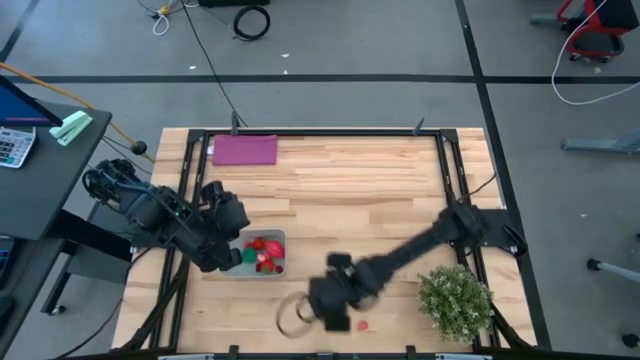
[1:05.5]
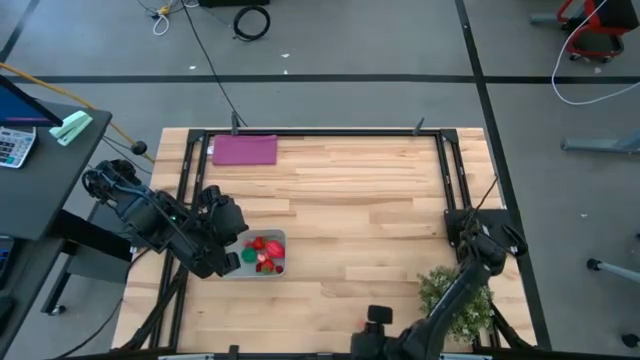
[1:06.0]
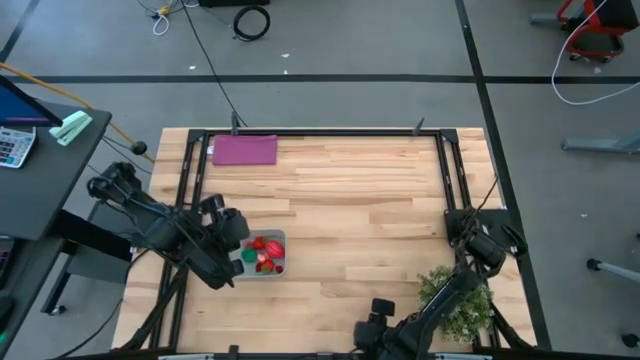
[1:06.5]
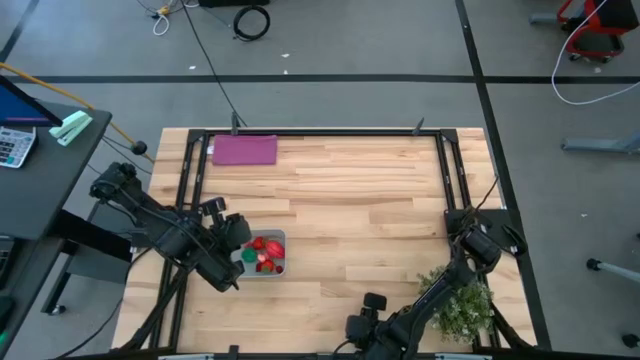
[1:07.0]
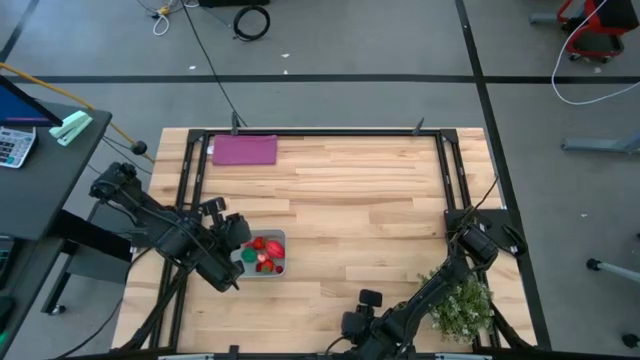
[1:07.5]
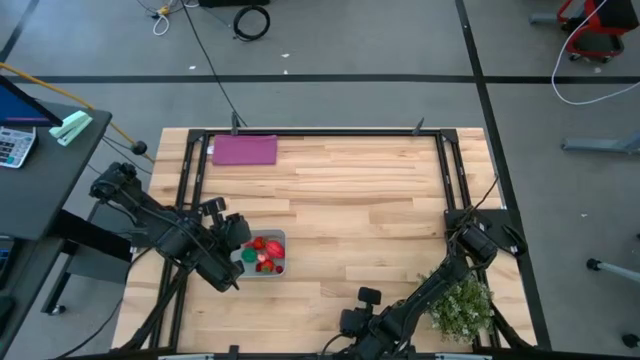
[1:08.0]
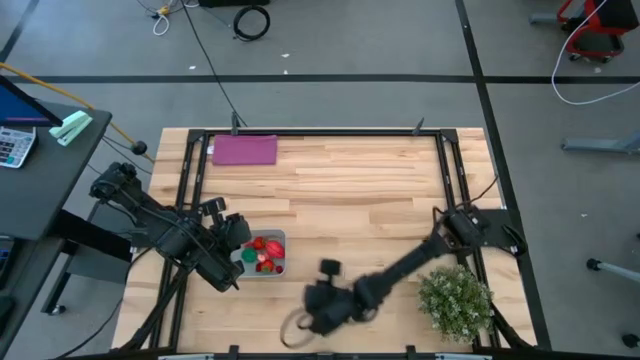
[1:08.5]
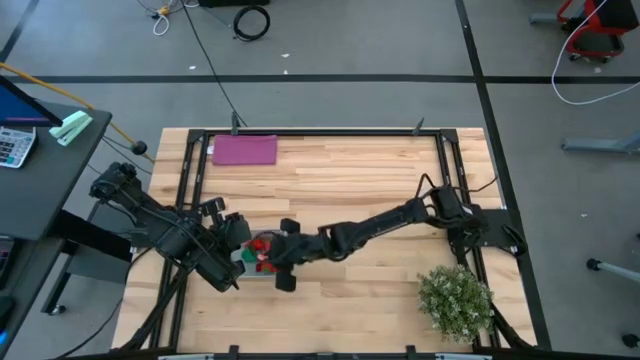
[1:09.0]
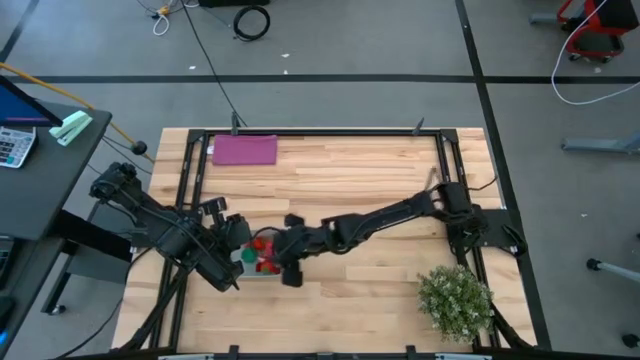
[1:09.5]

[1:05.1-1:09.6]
Task: Pick and placing Produce into tupperware
Put the lychee into the gray container

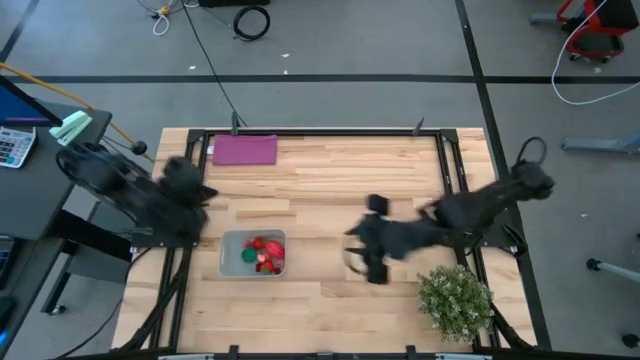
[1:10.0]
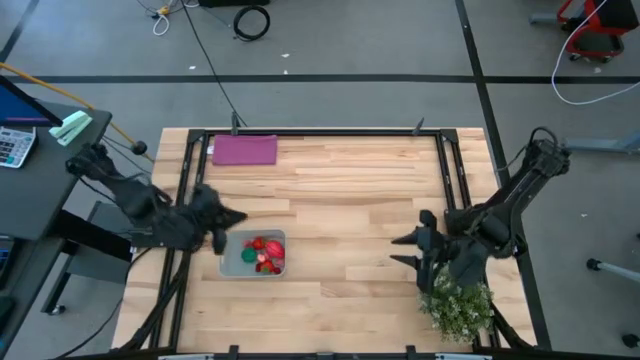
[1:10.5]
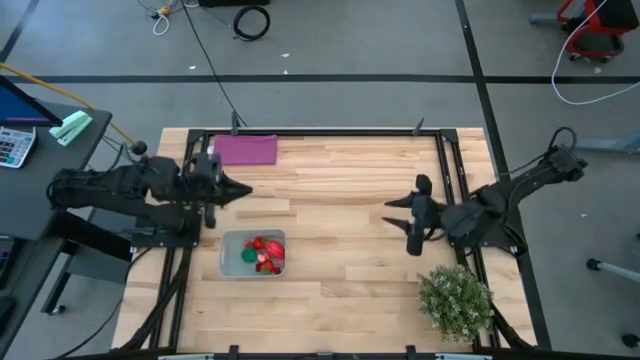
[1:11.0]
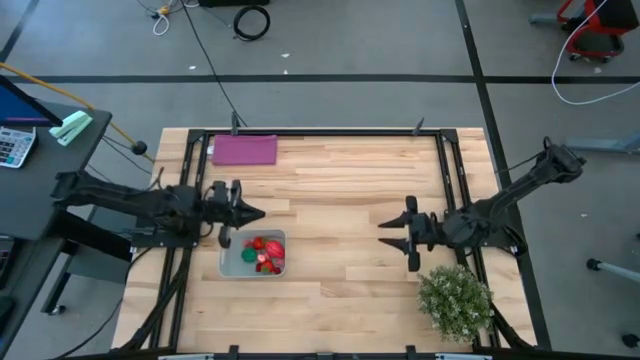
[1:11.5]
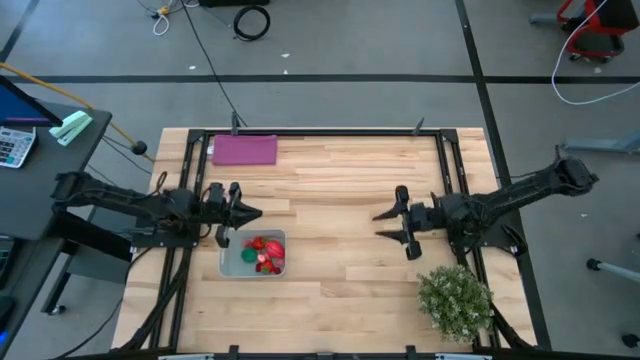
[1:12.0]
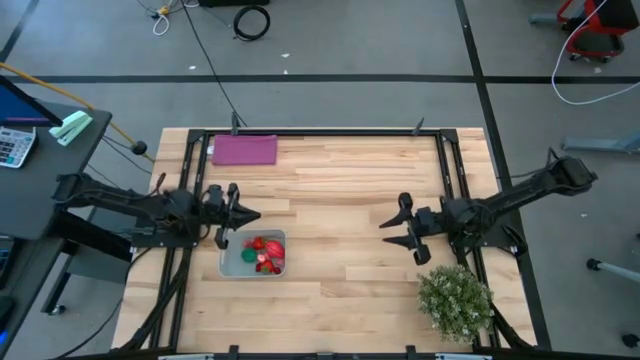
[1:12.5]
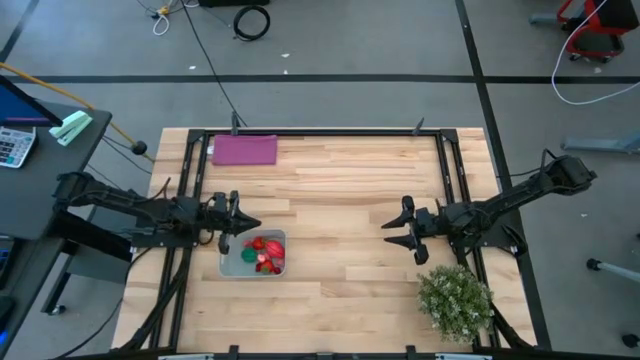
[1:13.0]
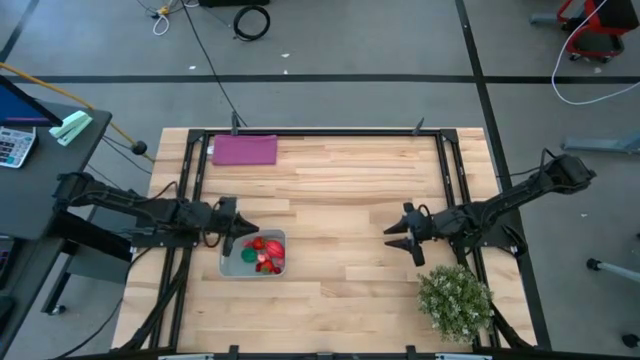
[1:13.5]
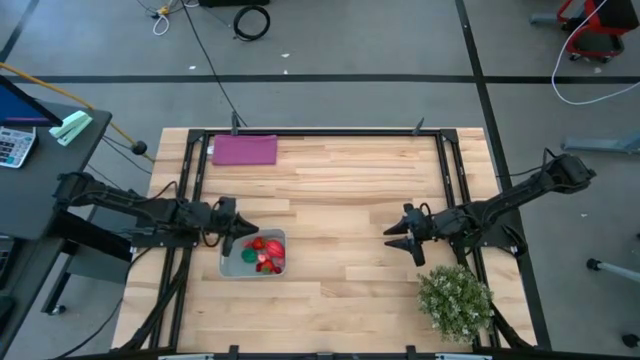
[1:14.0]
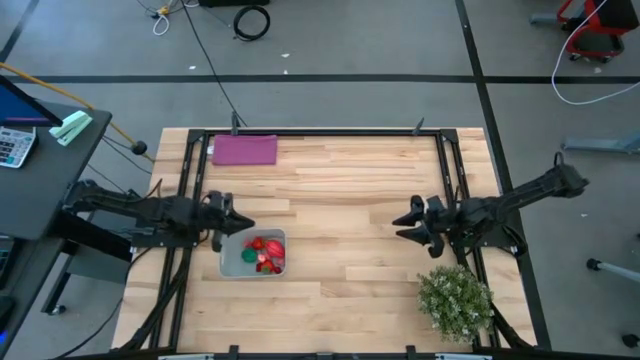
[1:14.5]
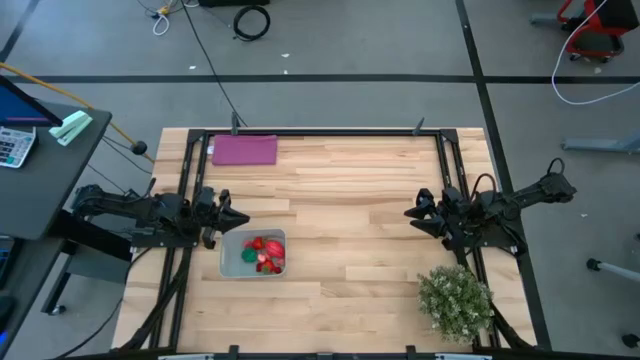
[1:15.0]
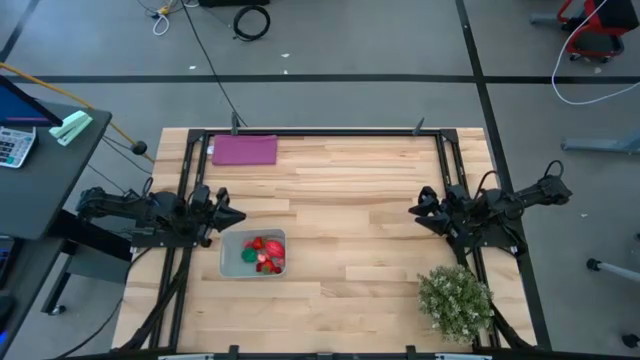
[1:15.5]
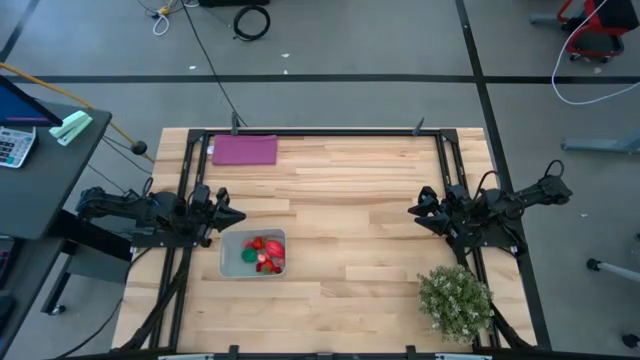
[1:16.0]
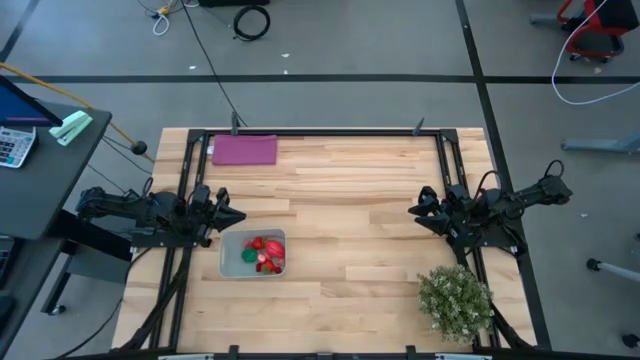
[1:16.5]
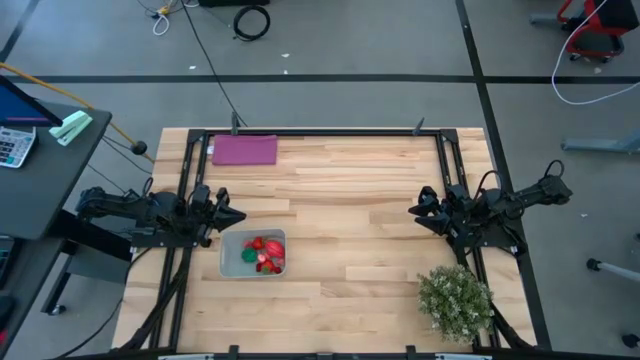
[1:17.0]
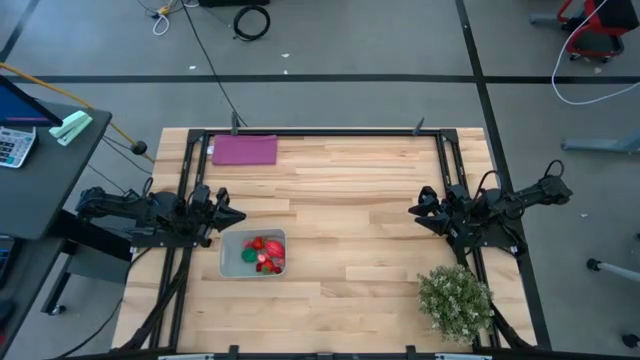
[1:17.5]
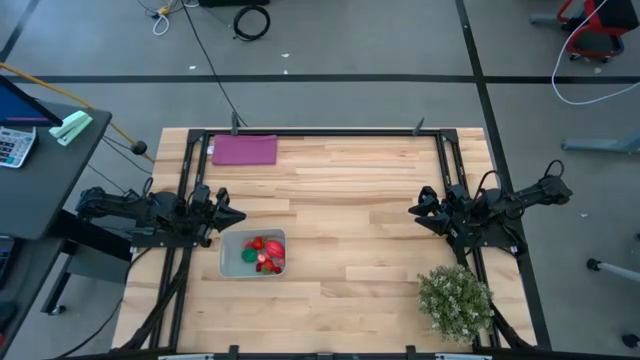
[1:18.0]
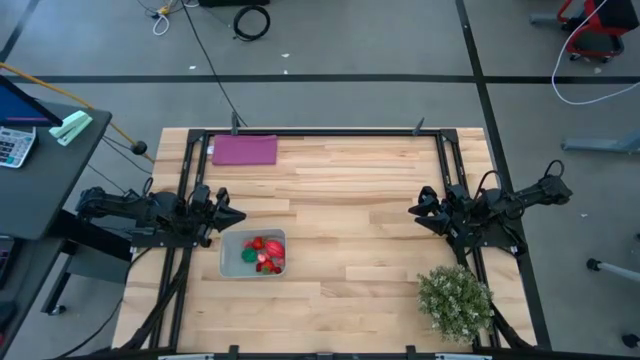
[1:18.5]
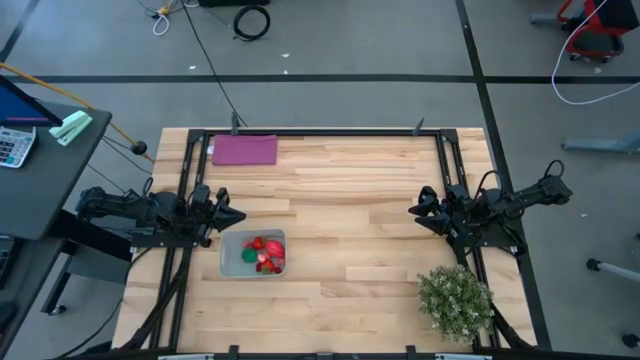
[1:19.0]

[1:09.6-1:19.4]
Return to Home Position

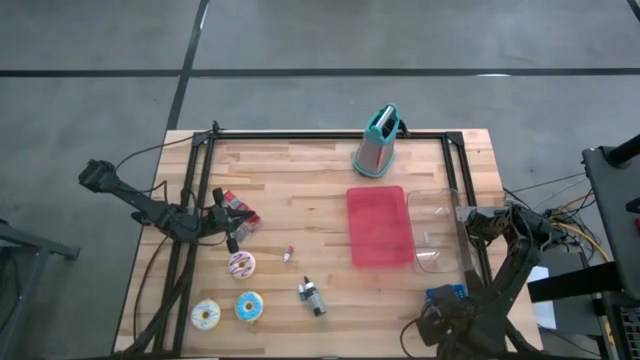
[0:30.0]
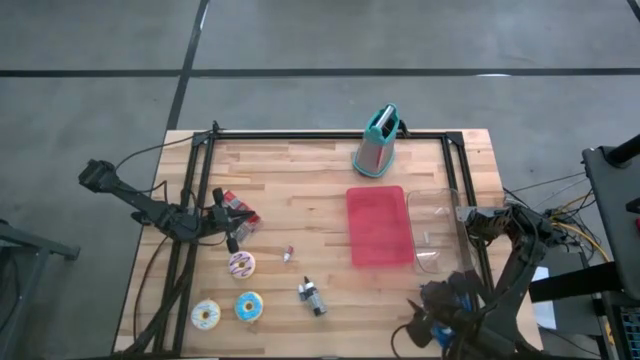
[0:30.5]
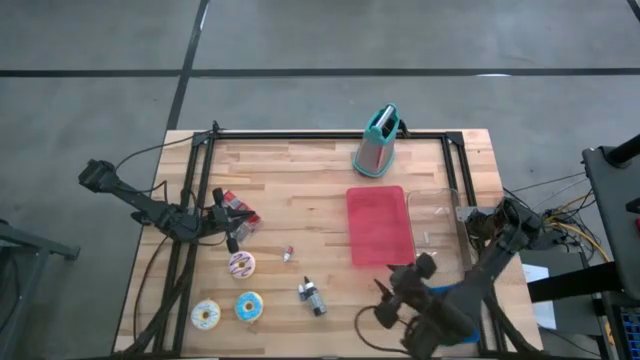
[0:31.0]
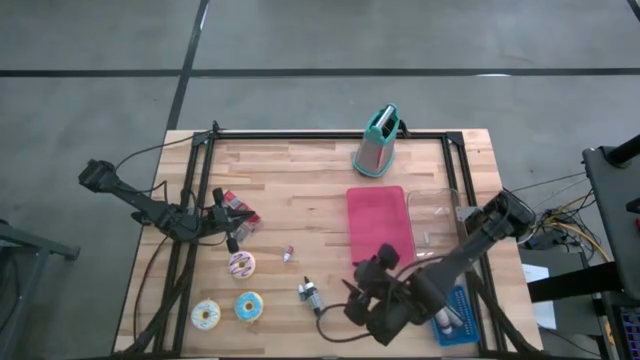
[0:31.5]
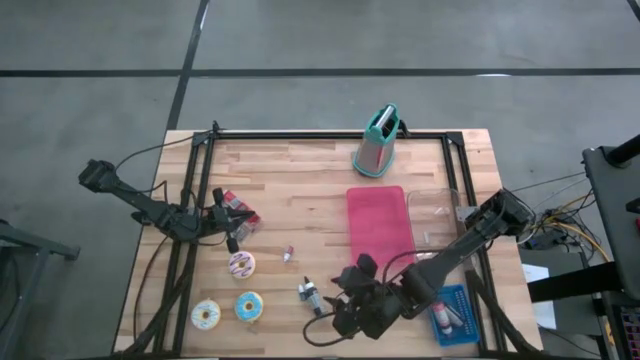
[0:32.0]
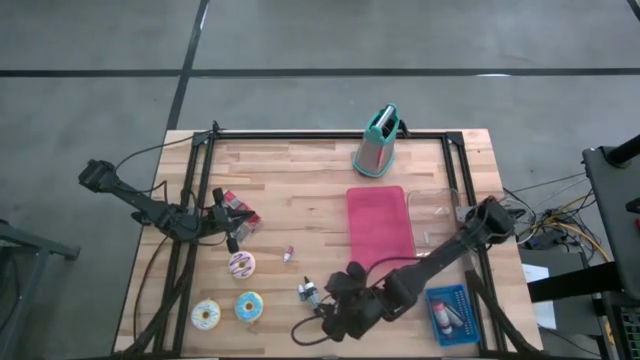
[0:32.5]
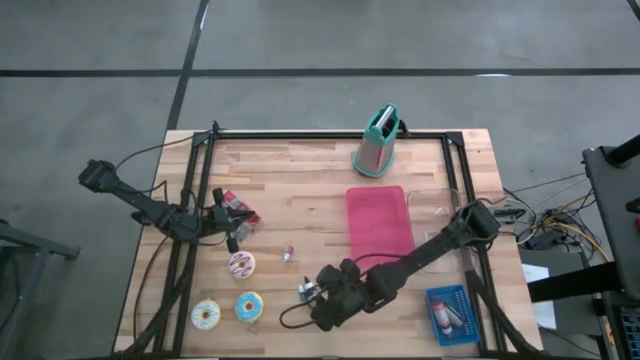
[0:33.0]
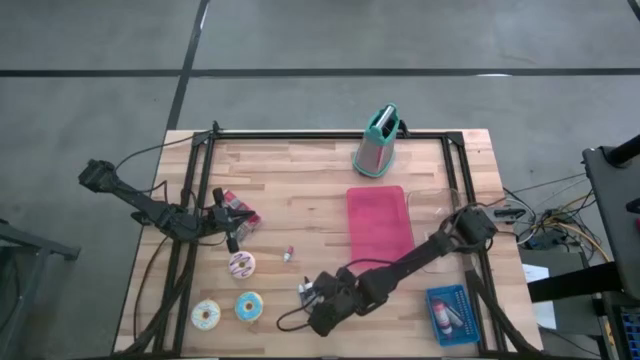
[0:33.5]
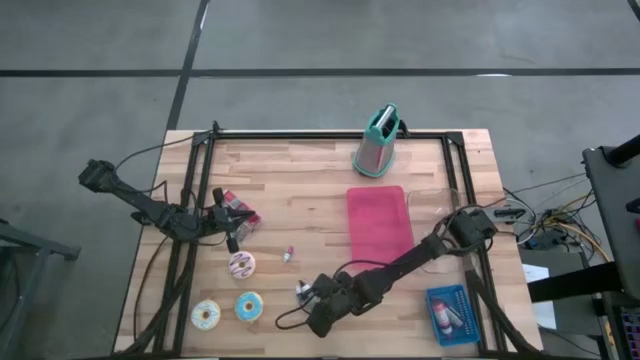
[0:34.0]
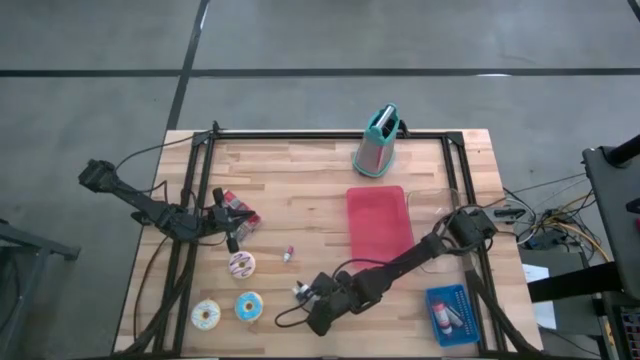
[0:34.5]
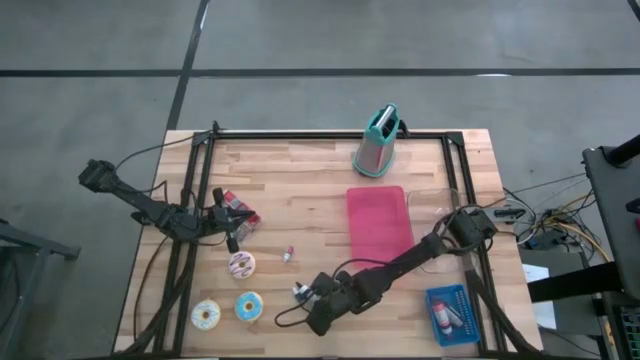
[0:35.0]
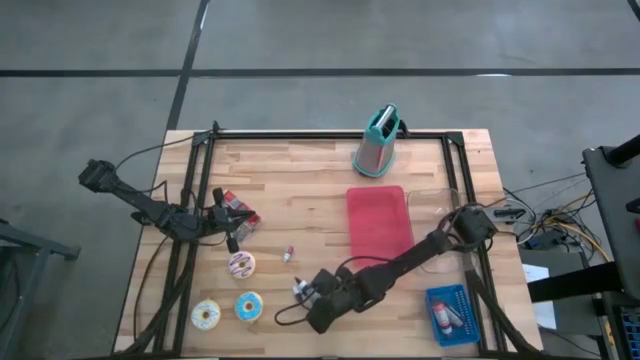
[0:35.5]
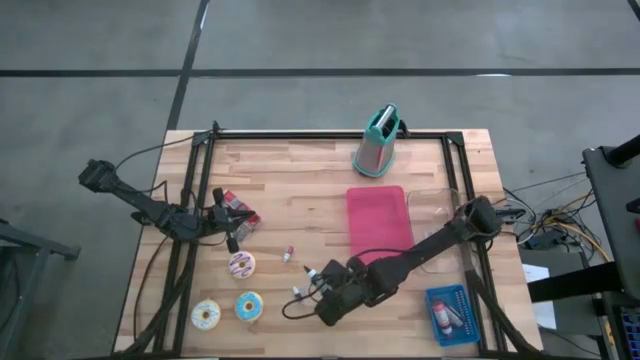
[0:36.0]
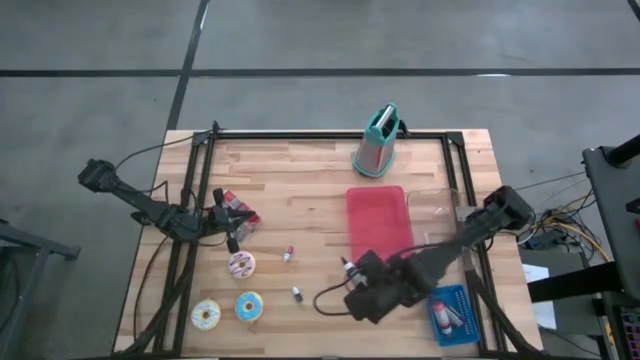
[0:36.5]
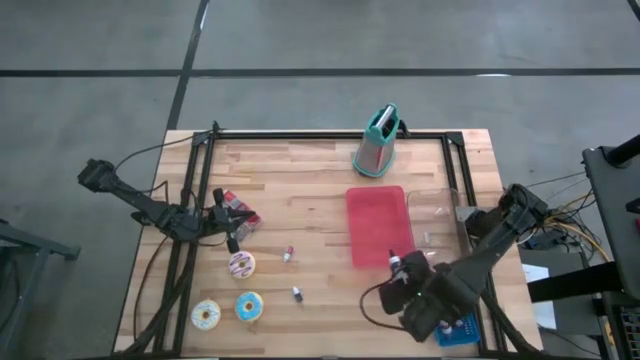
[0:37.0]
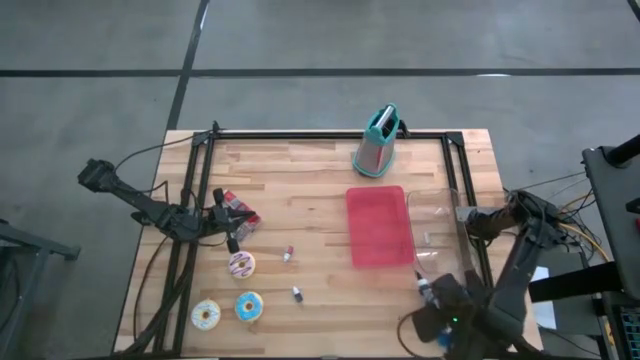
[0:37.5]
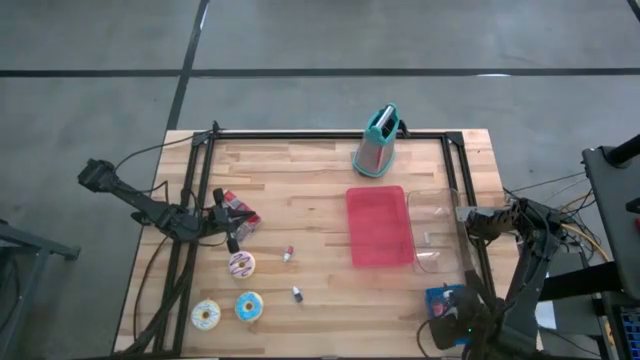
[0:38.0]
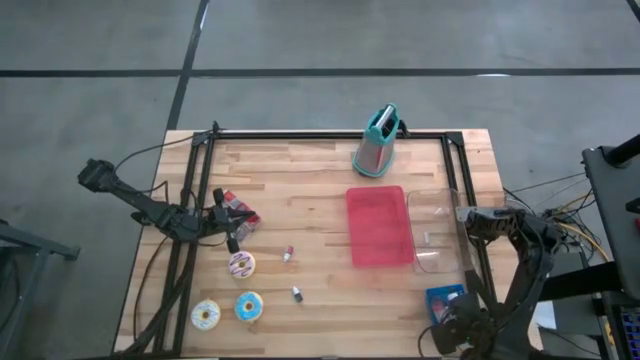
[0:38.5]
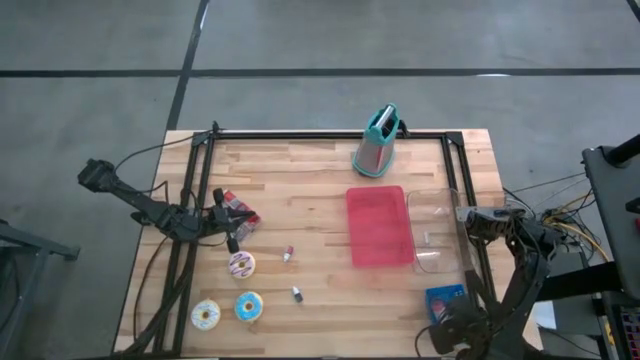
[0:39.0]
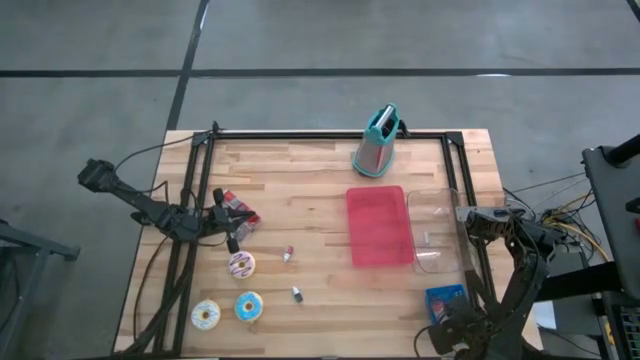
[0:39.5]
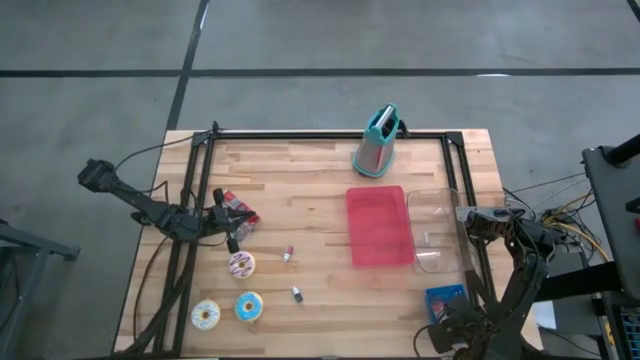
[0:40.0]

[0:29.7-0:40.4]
Task: Pick & Place Food Item
Put the black food coloring bottle into the blue bin
